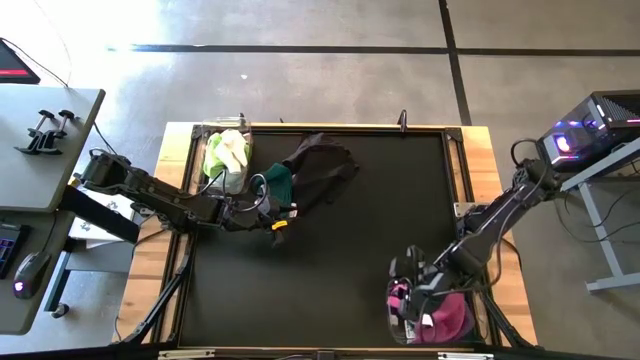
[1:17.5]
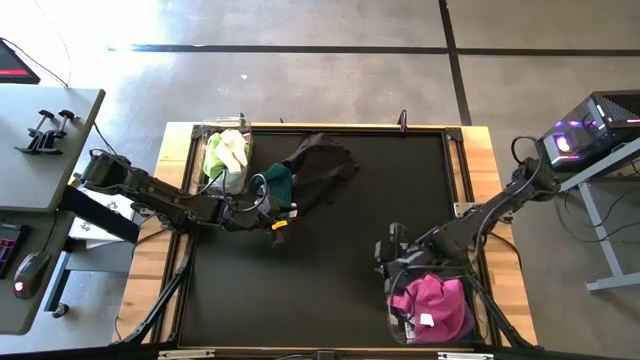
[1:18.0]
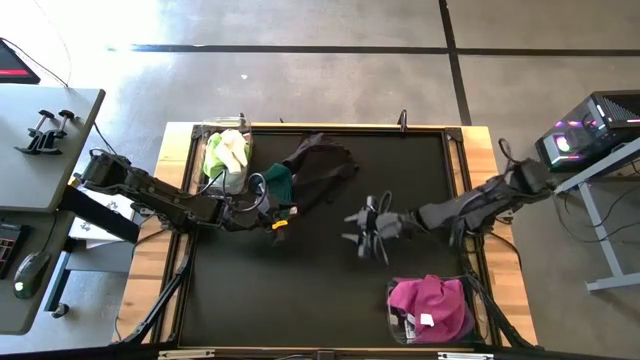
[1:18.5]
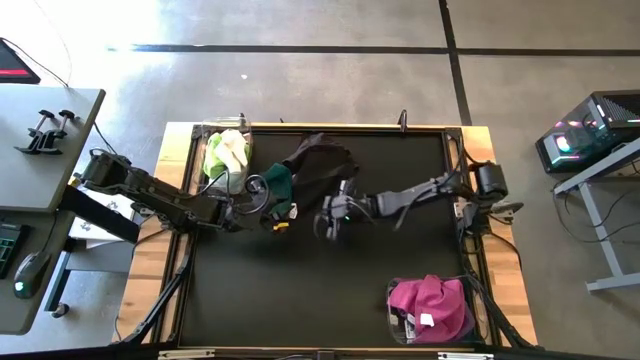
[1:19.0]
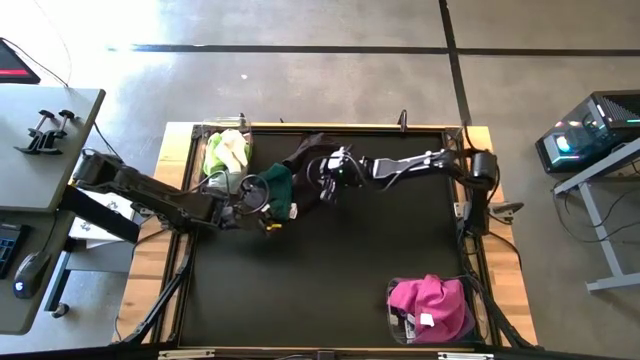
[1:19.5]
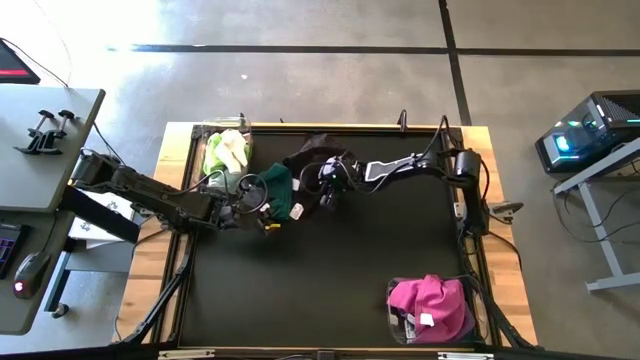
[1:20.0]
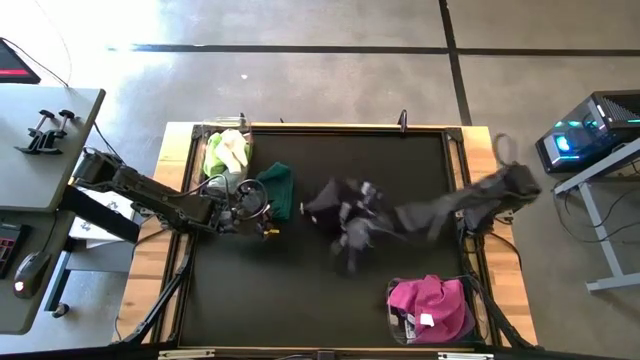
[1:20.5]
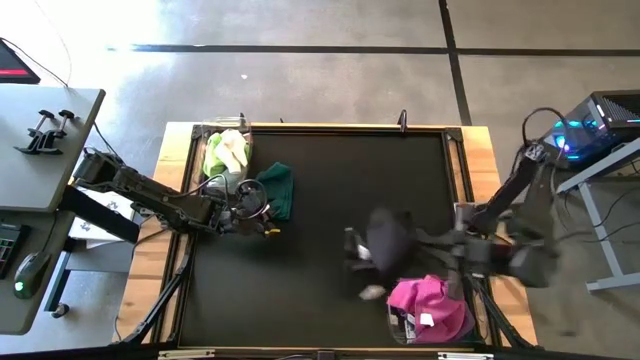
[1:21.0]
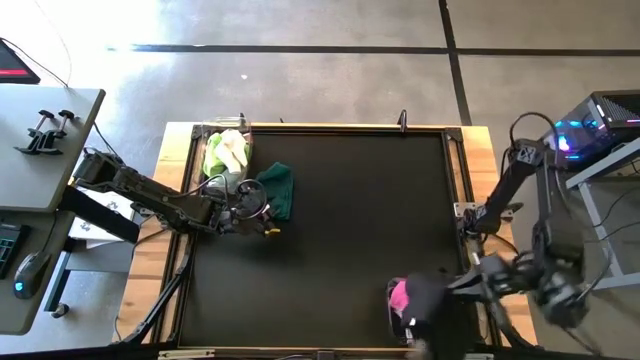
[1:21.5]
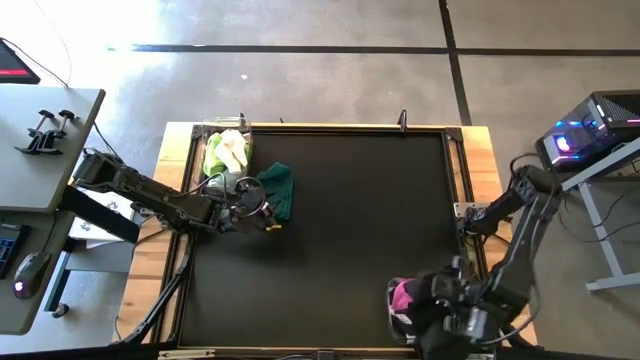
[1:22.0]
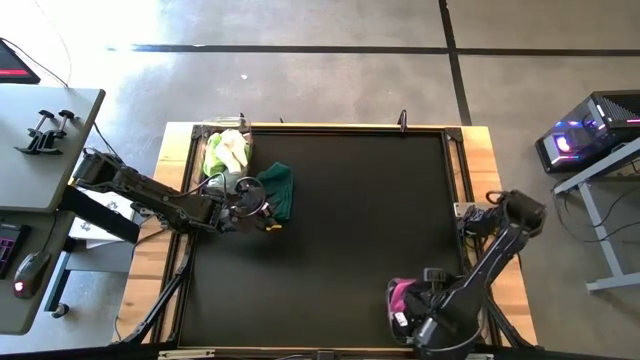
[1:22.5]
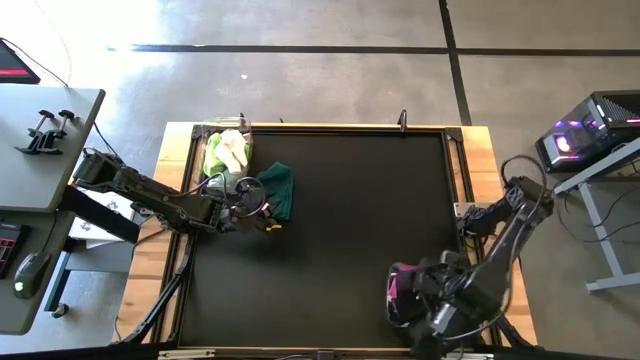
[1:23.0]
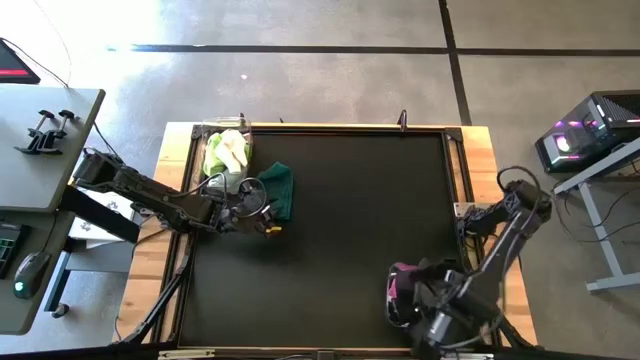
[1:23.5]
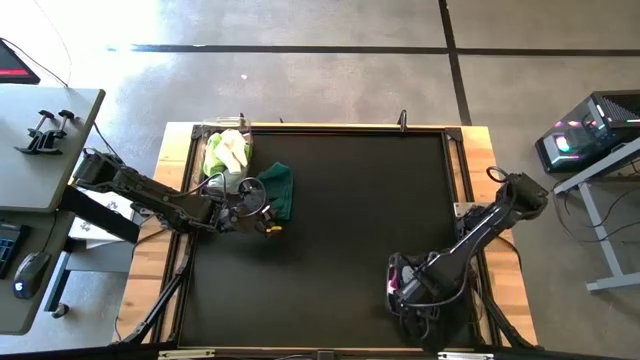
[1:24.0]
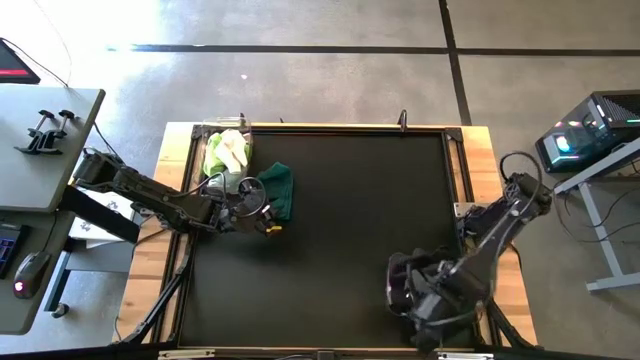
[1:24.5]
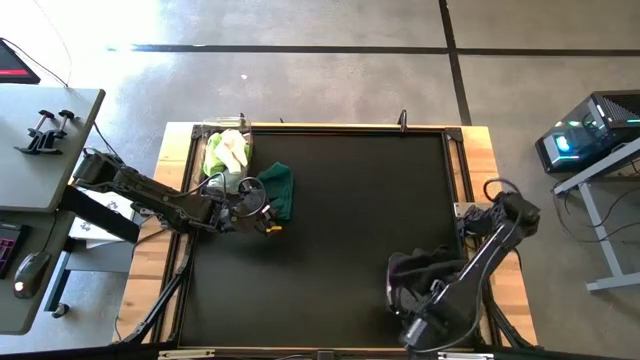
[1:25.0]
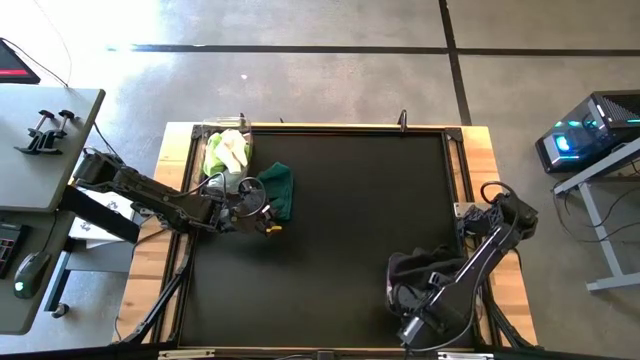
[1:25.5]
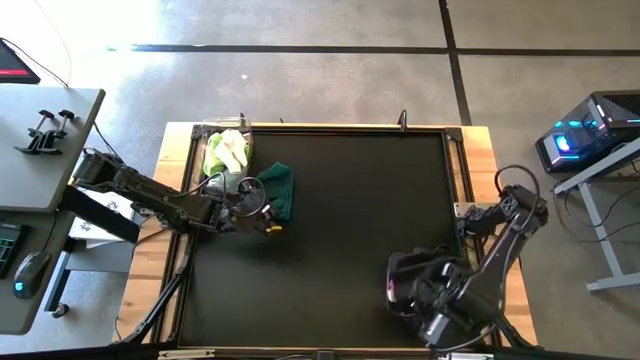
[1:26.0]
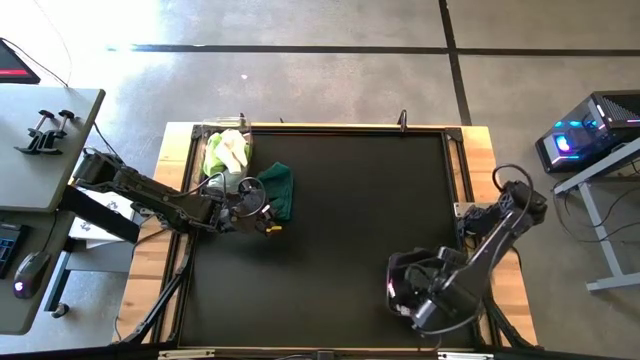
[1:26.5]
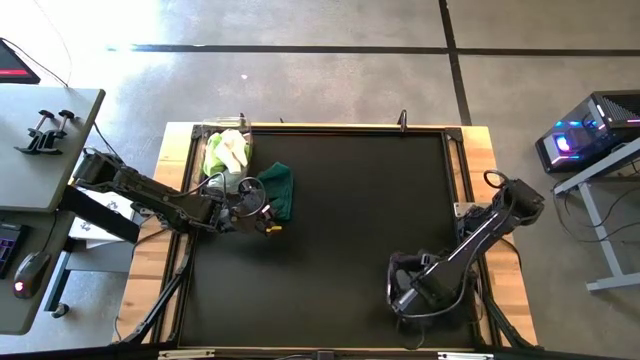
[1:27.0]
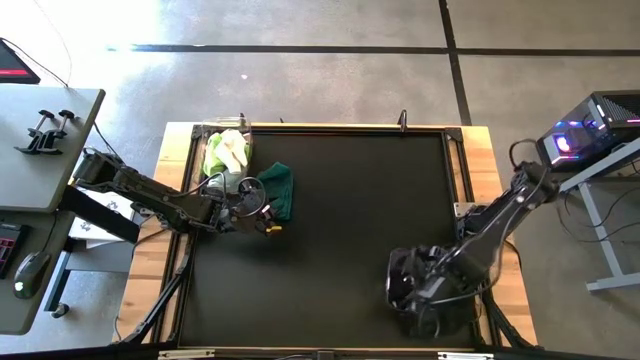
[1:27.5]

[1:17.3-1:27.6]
Task: Sort towels by color in basket
Put the black towel into the bottom transparent bin

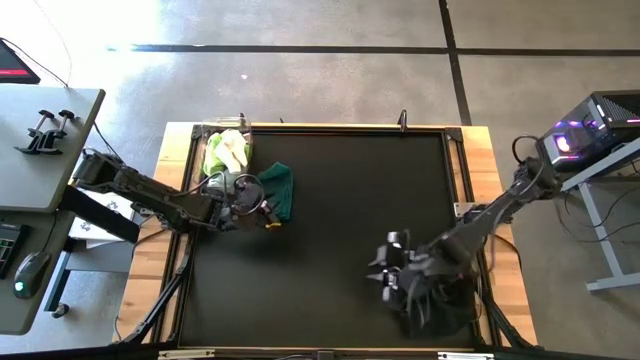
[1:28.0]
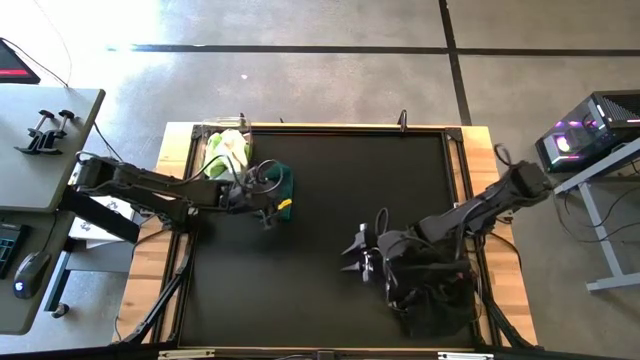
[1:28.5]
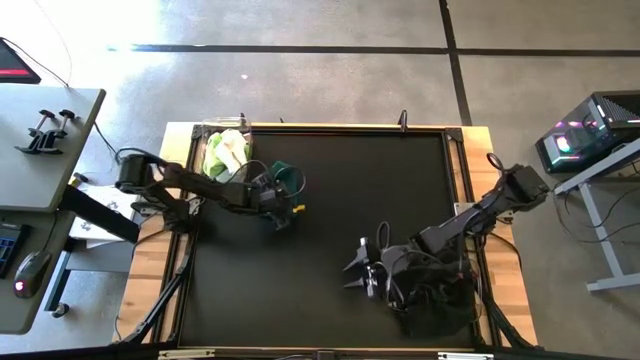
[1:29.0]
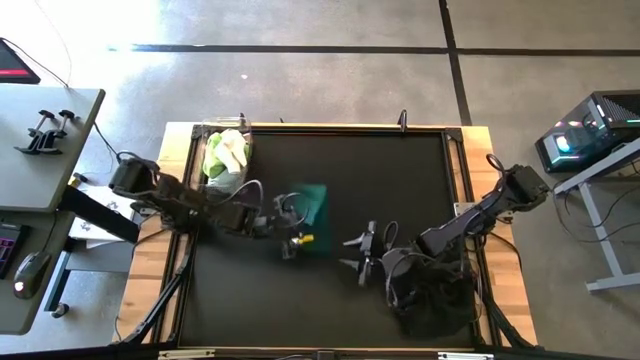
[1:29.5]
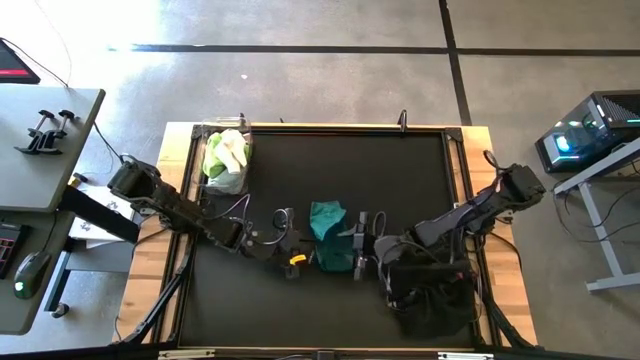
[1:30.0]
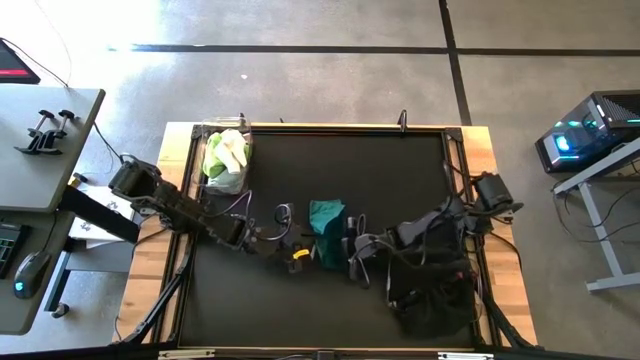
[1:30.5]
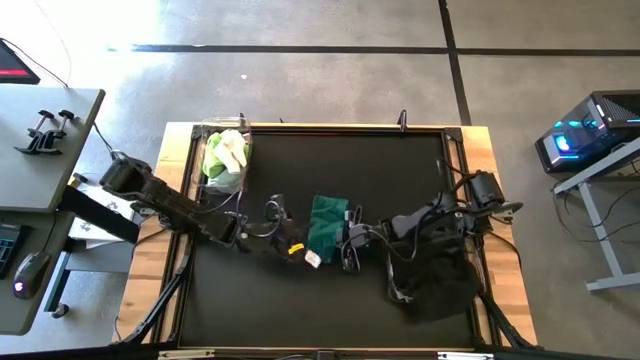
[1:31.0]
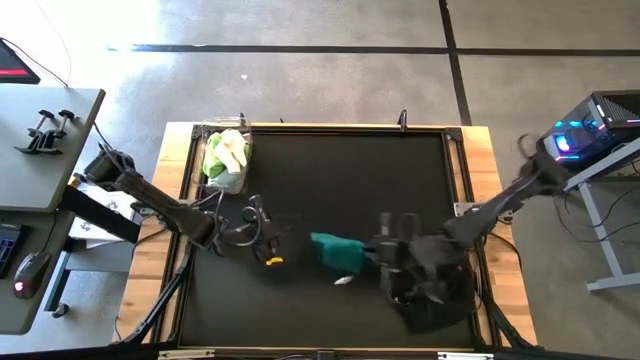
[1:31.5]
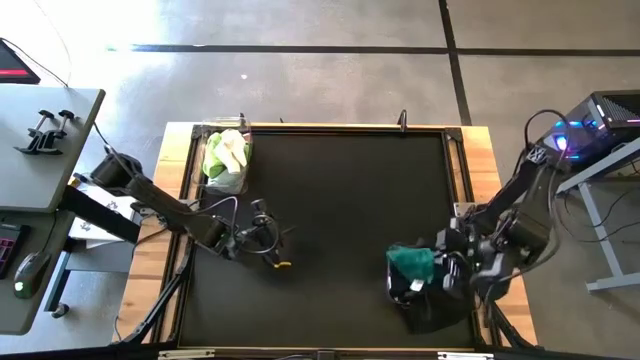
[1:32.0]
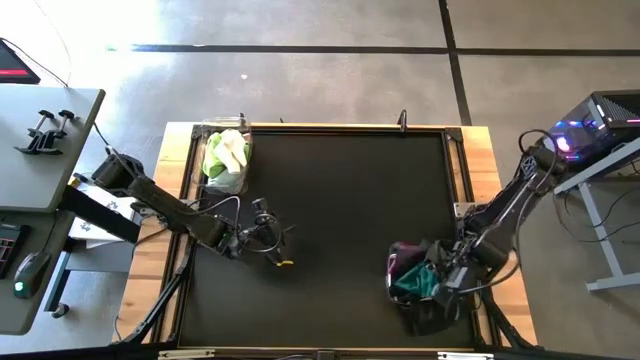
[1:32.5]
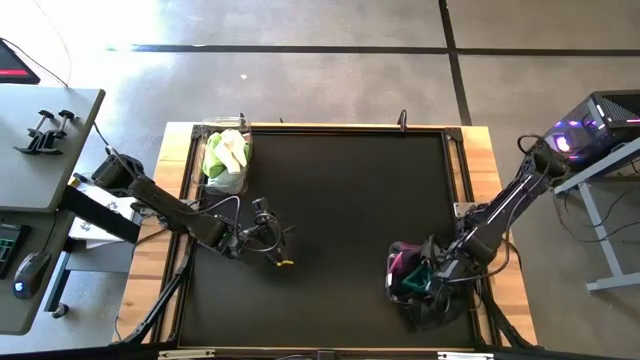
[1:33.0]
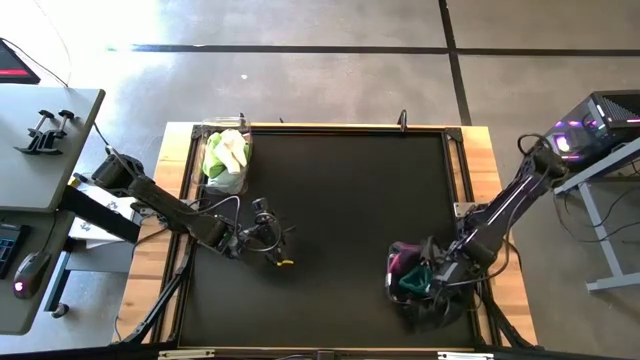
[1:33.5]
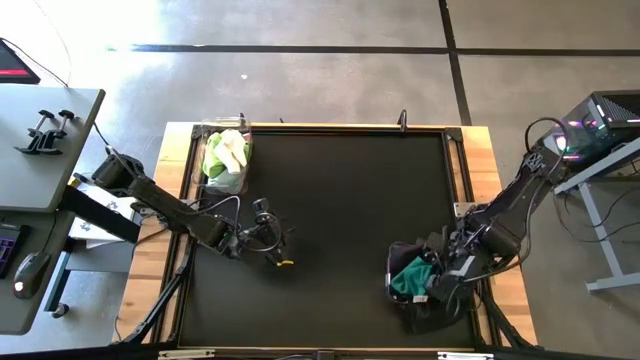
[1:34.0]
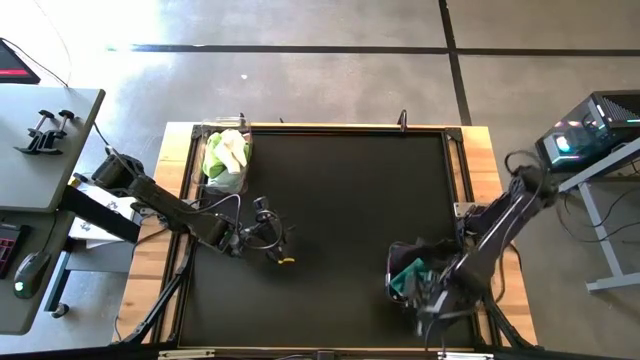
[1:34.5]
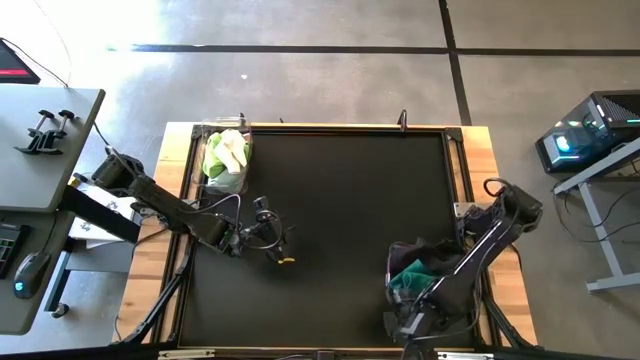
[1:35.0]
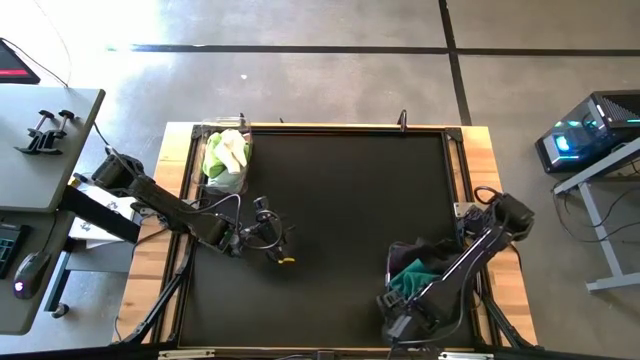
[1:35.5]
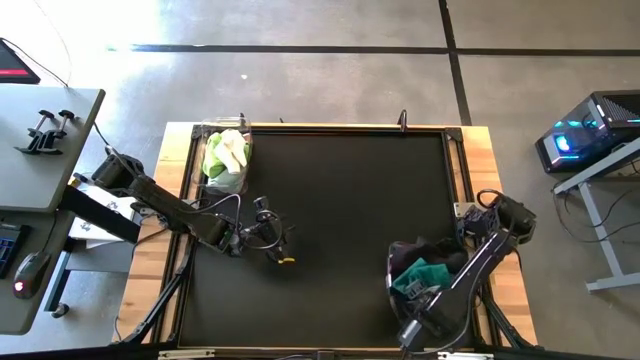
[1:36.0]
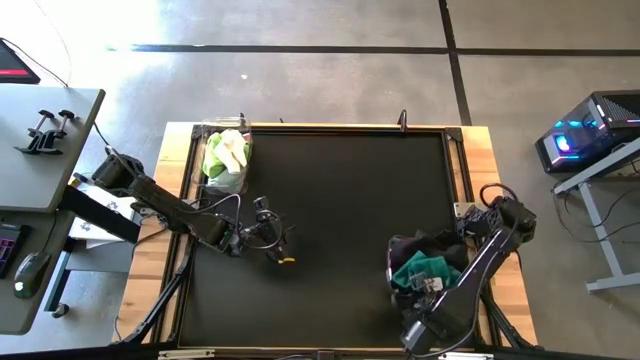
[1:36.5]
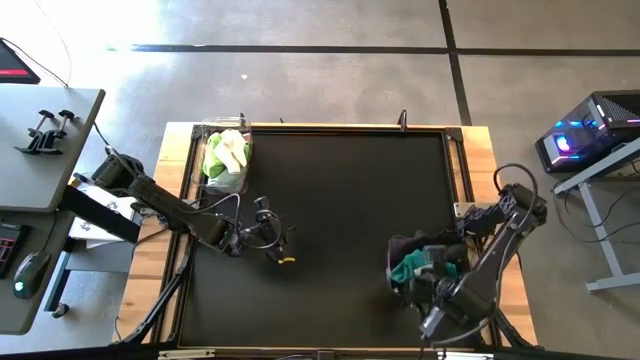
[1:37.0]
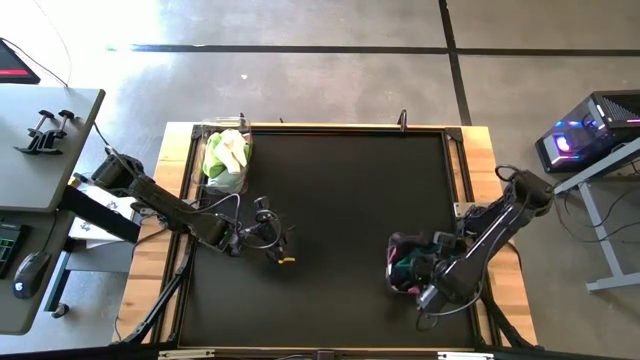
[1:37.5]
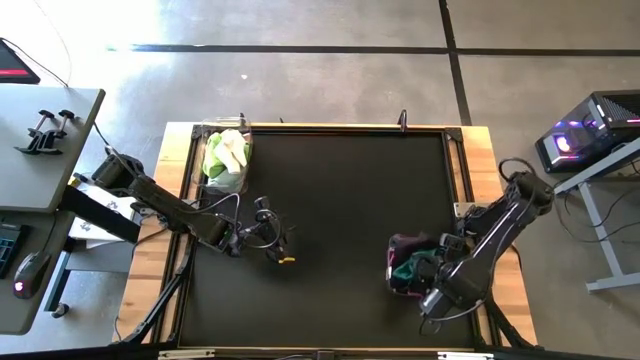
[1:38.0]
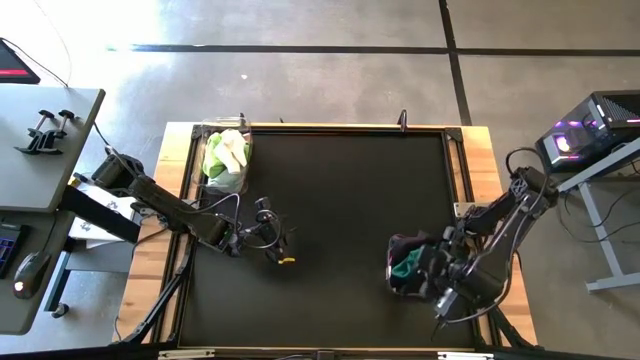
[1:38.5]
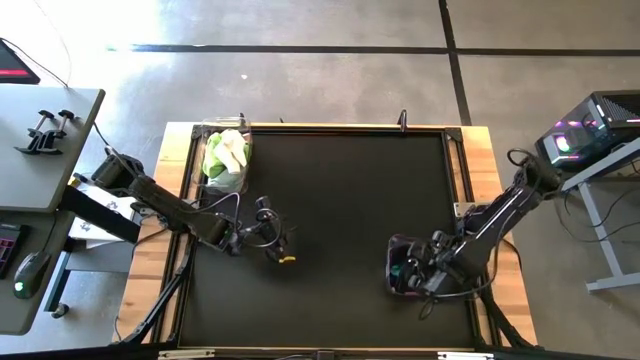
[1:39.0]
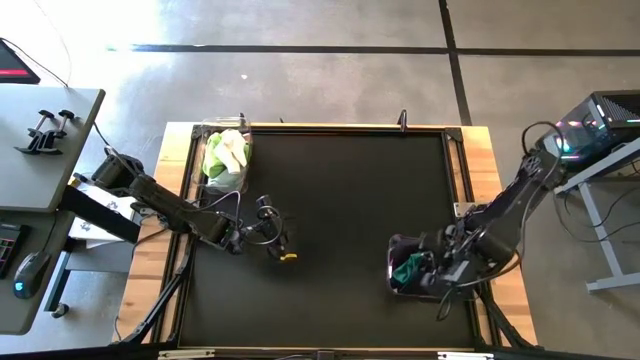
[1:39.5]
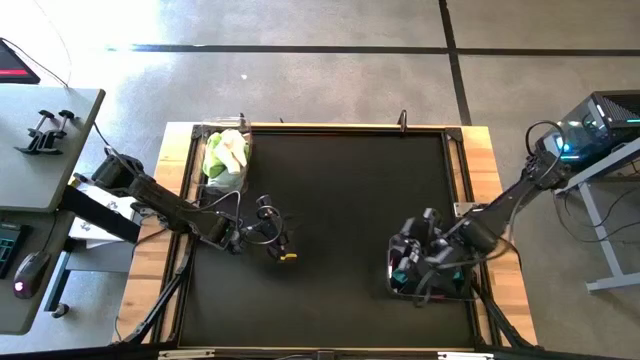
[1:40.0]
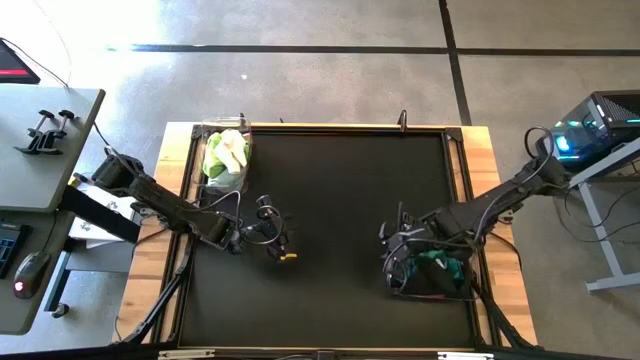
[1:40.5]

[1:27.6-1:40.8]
Put the green towel into the bottom transparent bin
